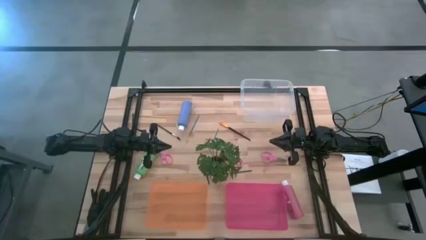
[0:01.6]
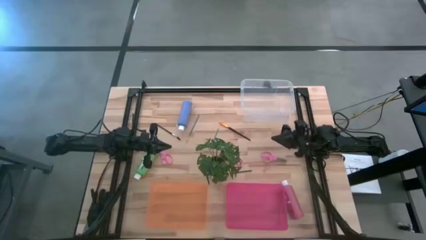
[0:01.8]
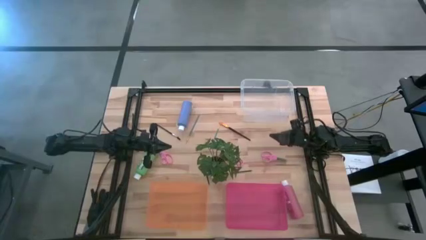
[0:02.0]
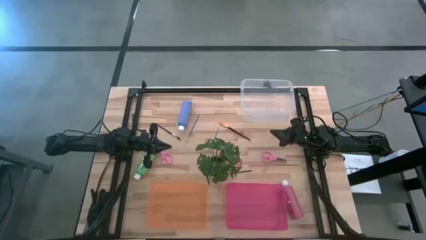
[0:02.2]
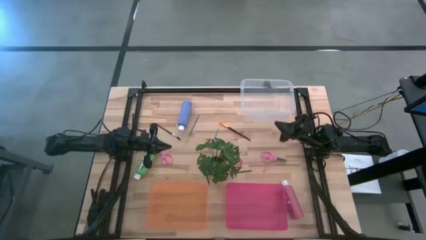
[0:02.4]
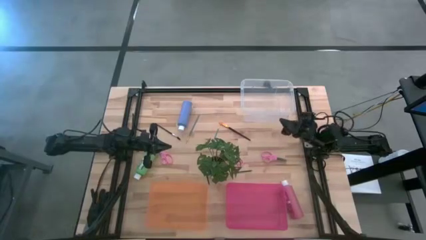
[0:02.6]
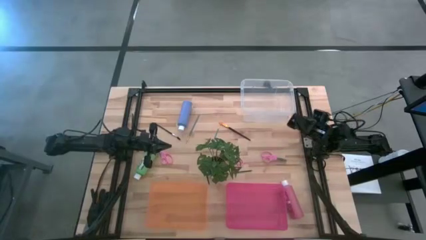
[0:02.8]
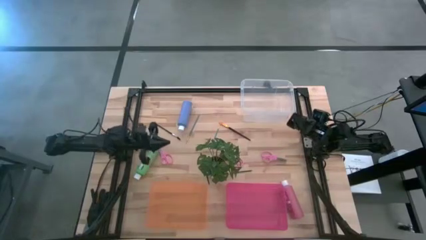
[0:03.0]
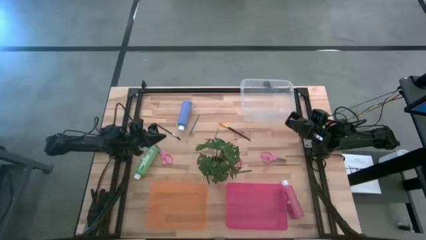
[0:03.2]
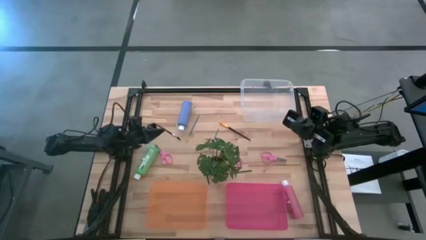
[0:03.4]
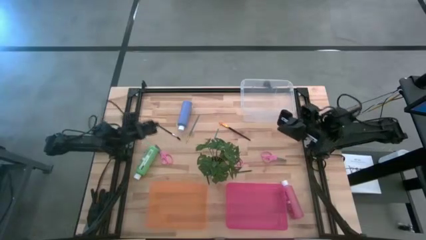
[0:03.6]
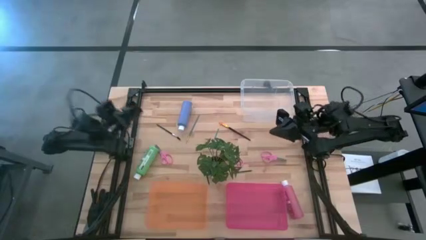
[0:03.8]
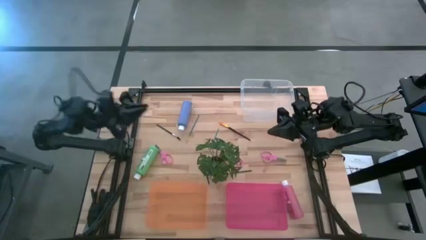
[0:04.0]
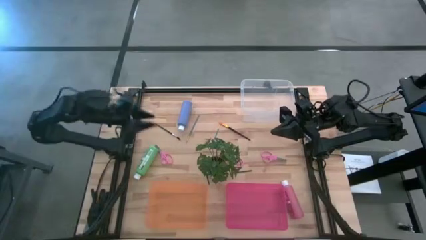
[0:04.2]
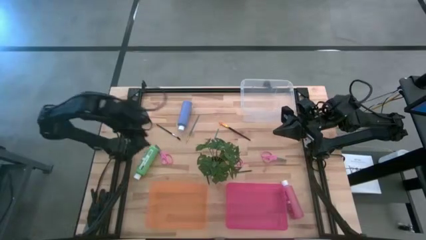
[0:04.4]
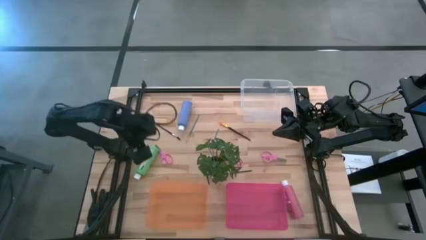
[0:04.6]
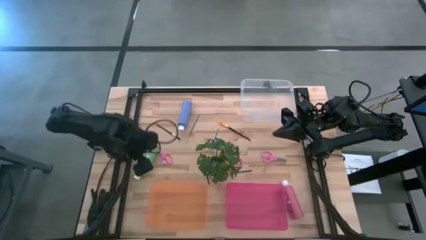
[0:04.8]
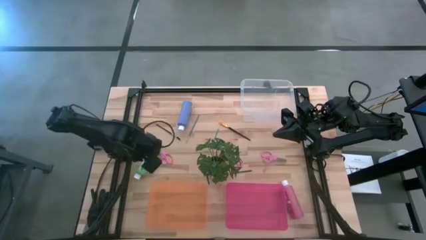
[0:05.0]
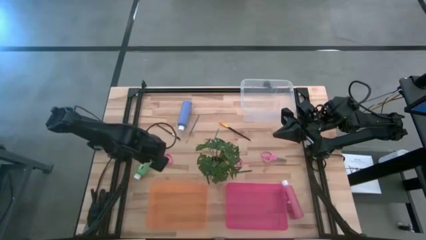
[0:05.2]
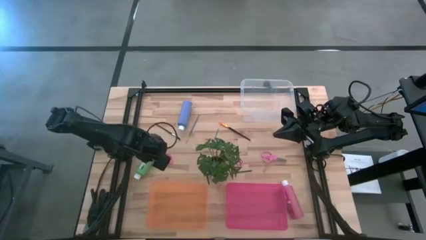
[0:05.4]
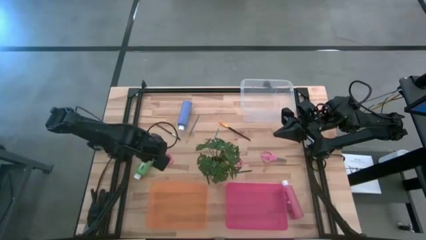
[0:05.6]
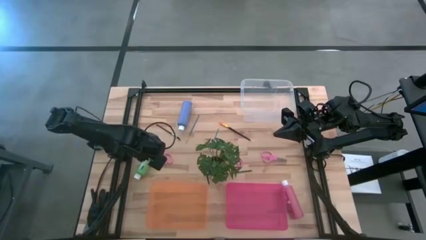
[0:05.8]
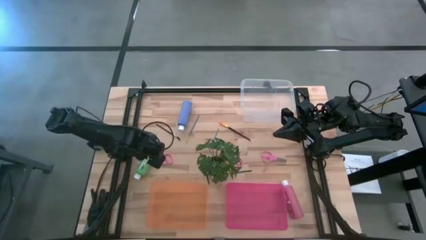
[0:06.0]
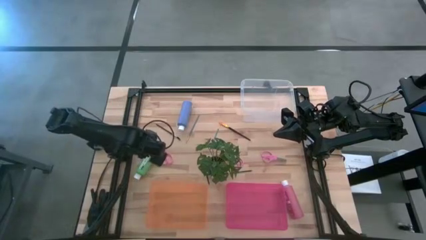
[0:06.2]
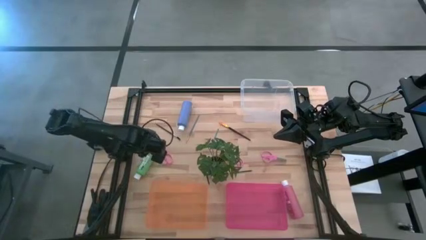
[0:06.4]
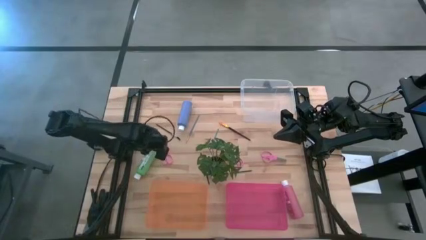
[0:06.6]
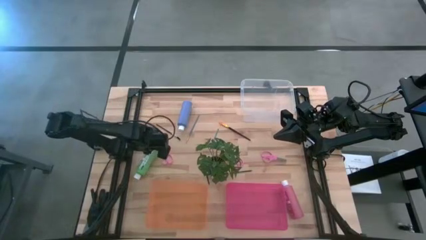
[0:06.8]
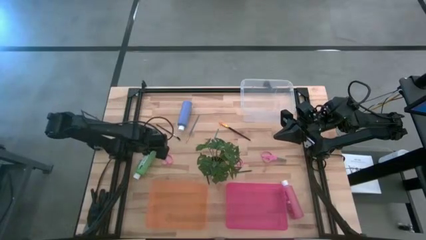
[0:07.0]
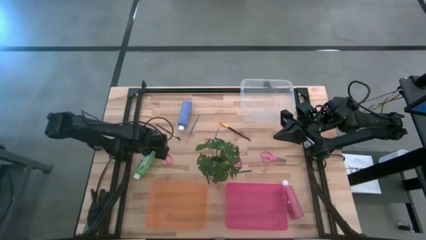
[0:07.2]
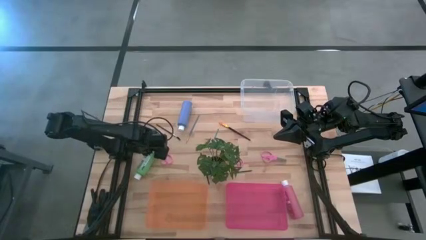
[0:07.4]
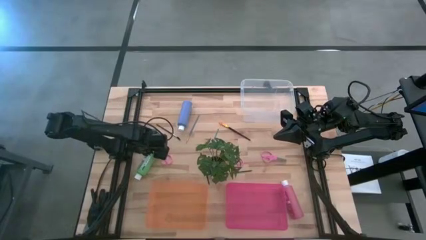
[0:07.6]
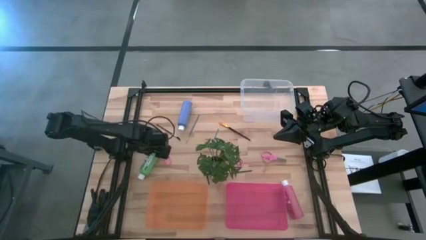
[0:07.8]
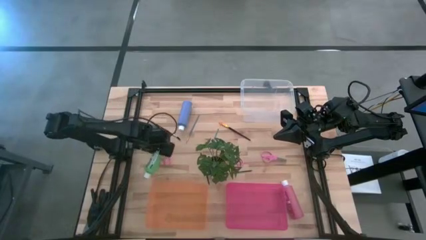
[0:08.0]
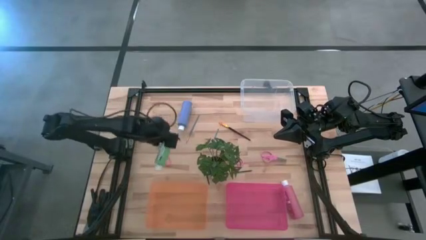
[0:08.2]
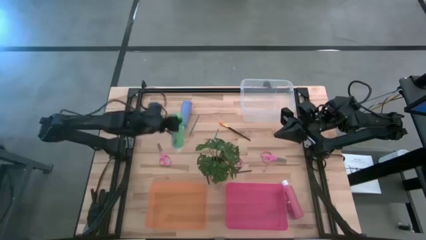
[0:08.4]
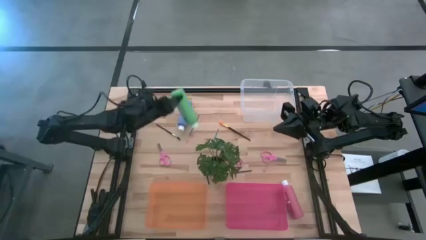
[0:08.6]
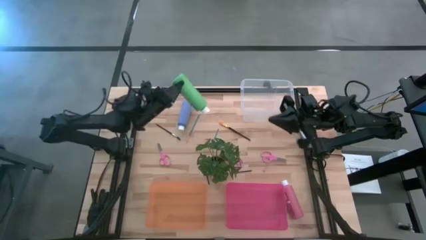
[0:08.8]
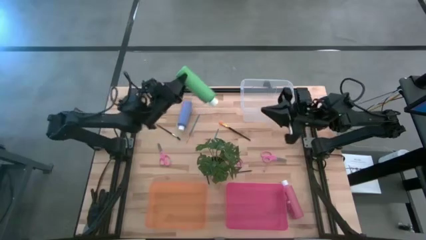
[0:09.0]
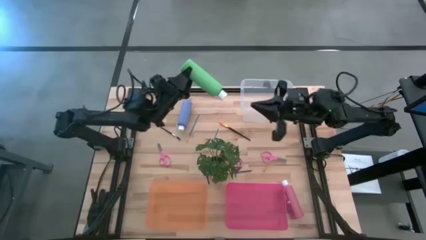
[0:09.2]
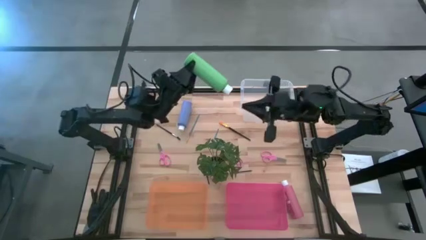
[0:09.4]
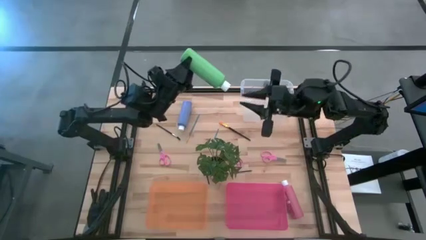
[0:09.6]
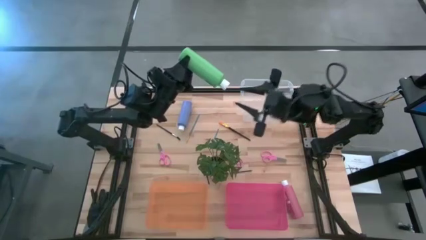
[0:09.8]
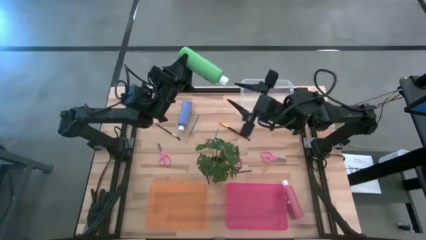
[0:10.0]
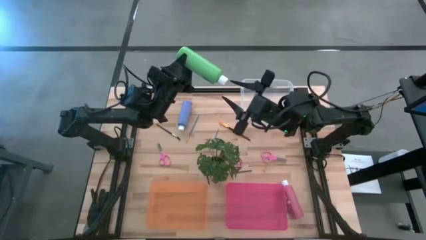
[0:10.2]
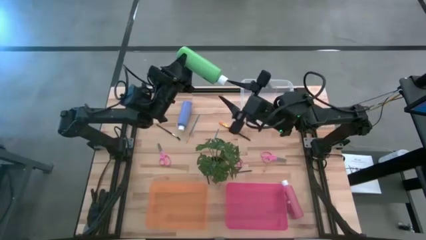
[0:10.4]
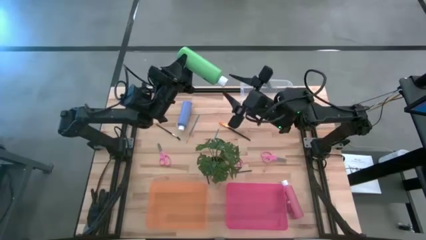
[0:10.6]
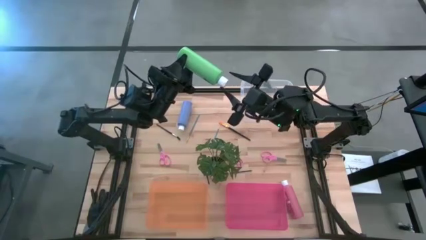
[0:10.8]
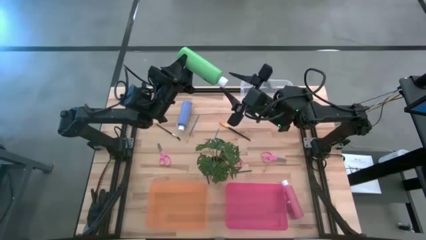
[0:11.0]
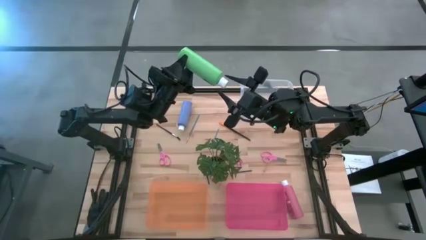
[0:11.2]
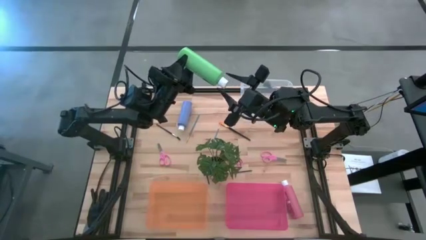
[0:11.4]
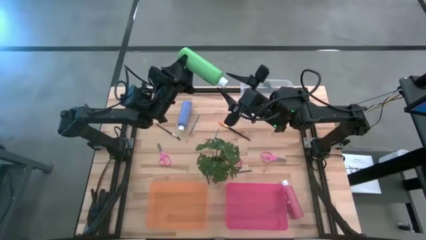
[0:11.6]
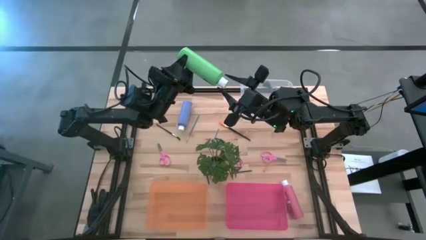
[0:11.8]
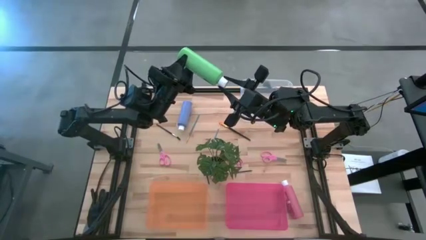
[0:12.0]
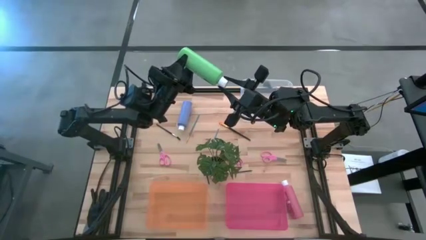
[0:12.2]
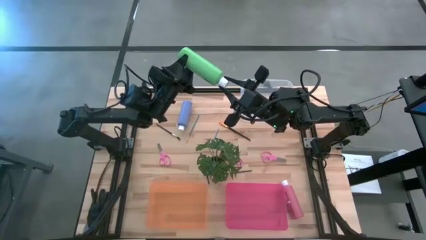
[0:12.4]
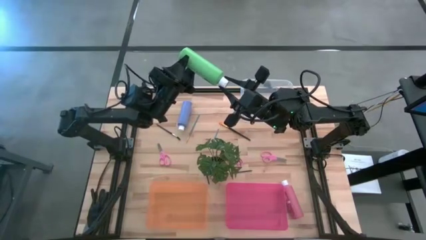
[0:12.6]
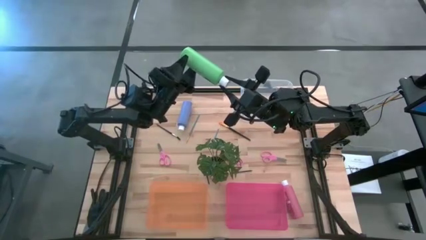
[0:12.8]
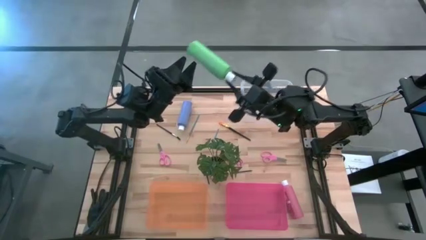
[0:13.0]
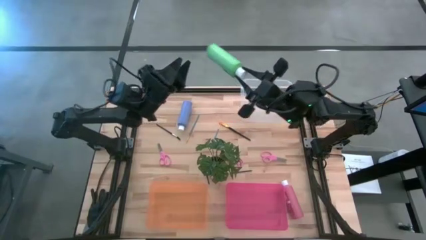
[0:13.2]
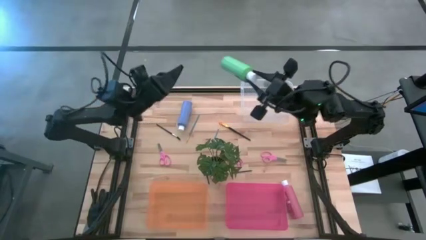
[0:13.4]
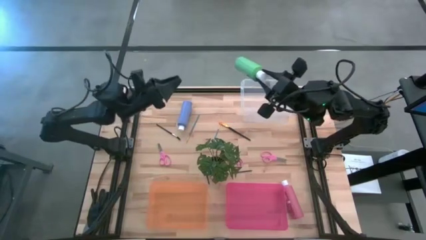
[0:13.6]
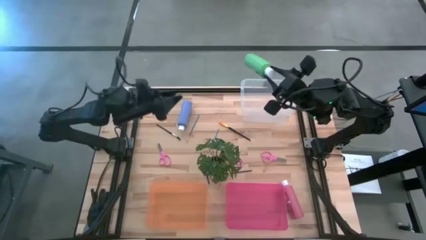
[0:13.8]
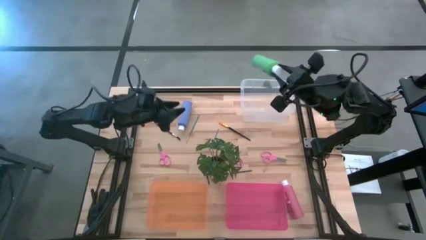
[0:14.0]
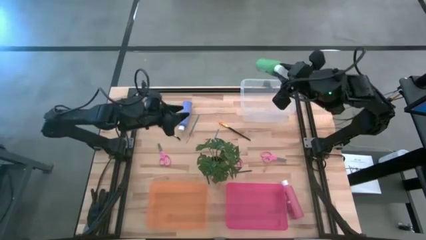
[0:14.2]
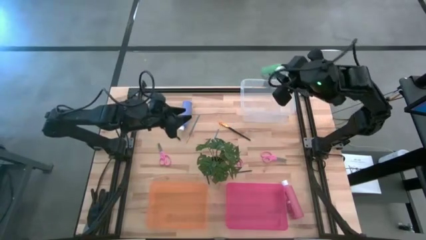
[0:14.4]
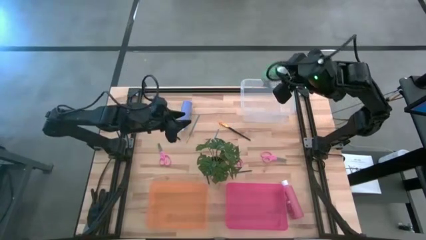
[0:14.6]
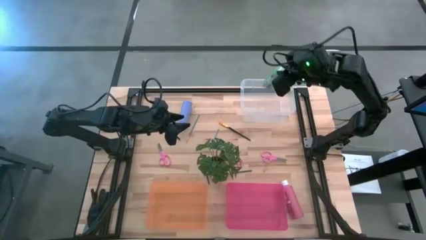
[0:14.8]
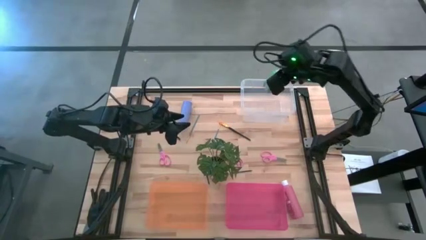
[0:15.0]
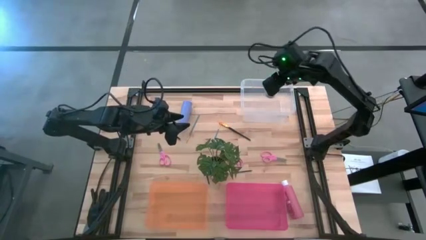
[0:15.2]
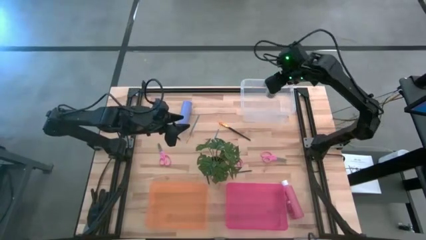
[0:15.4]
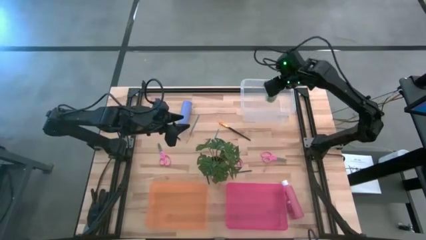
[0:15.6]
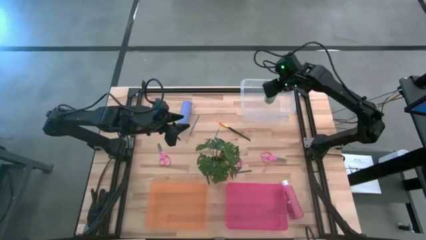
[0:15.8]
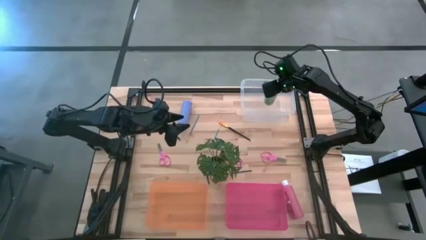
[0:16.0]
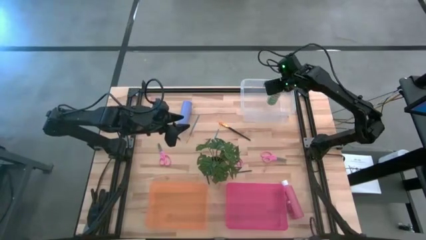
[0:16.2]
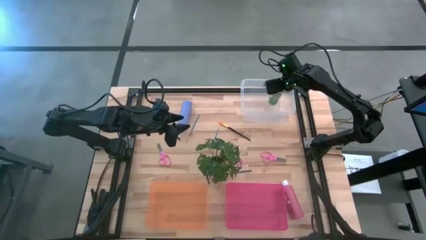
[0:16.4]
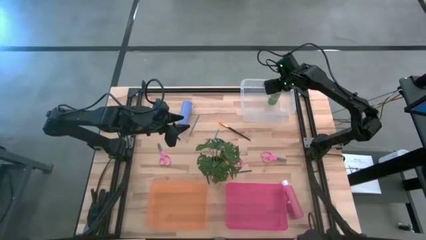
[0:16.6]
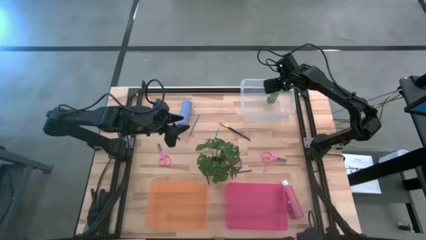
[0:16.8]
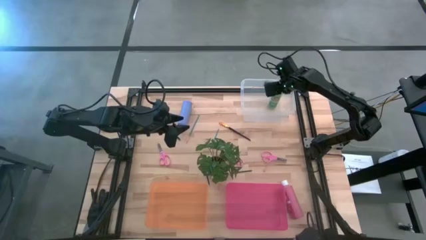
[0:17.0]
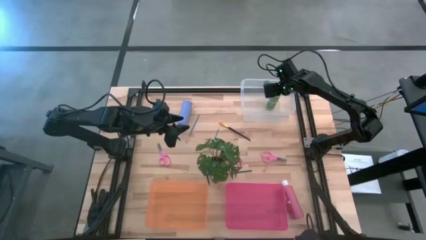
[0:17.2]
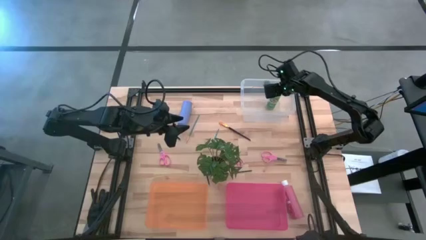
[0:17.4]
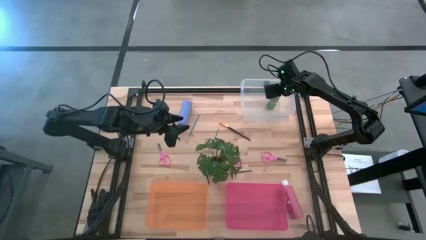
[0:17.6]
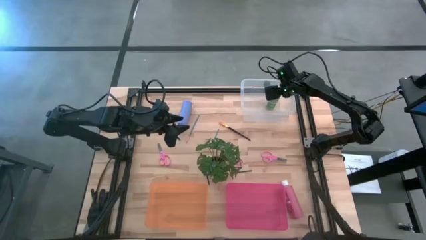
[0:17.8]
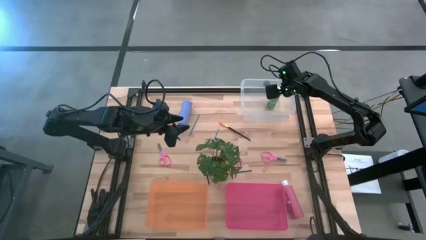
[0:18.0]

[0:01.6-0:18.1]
Task: Pick & Place Paint Supplies
Put the green acrylic craft paint bottle into the transparent bin
